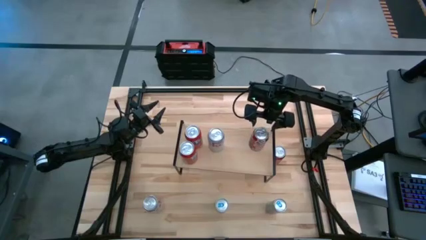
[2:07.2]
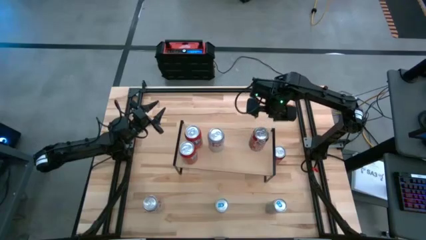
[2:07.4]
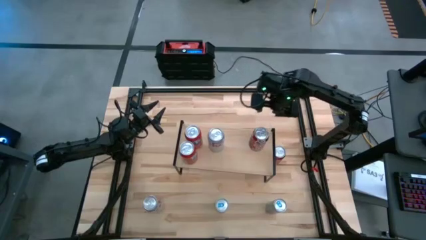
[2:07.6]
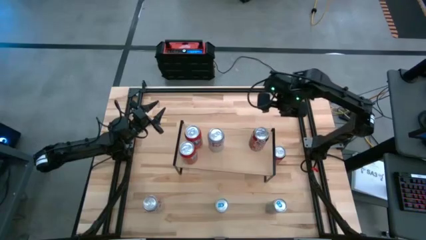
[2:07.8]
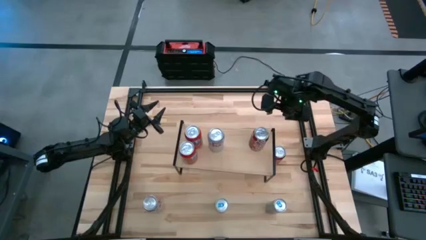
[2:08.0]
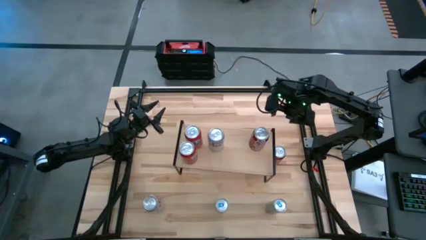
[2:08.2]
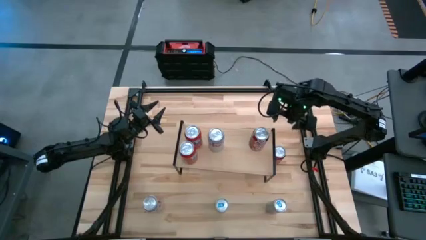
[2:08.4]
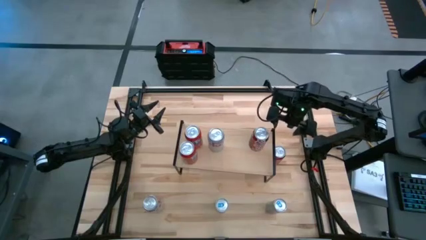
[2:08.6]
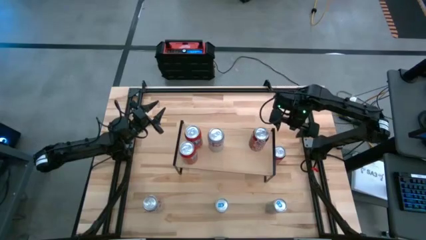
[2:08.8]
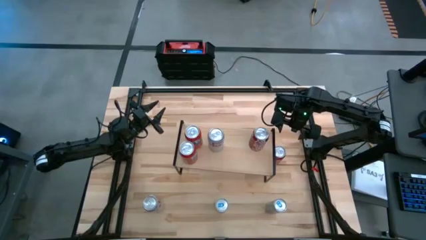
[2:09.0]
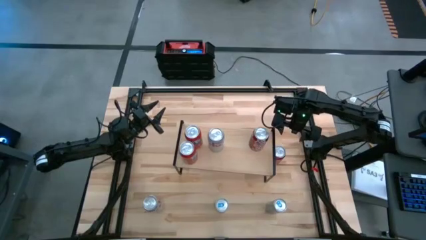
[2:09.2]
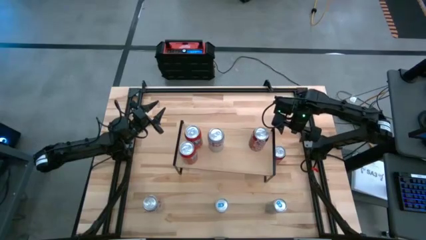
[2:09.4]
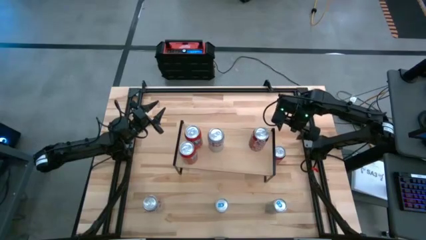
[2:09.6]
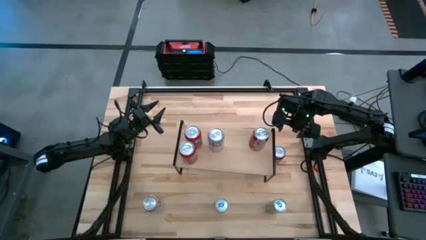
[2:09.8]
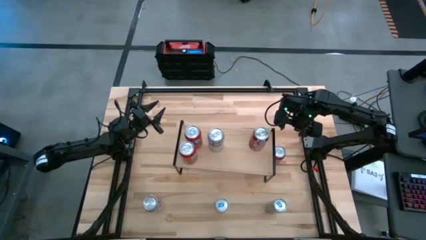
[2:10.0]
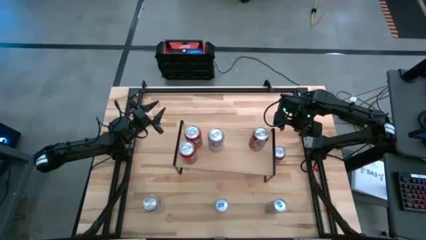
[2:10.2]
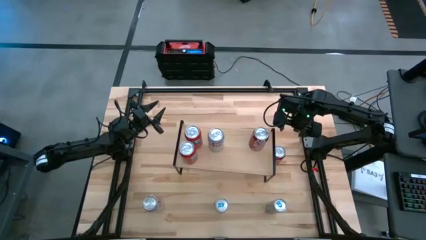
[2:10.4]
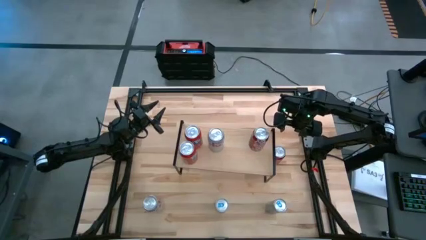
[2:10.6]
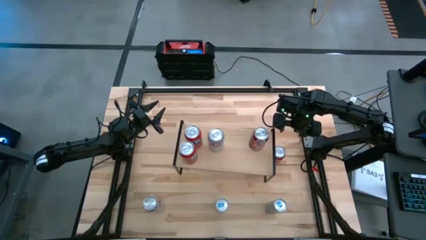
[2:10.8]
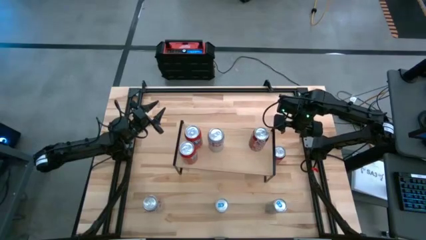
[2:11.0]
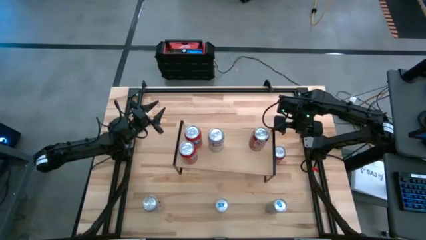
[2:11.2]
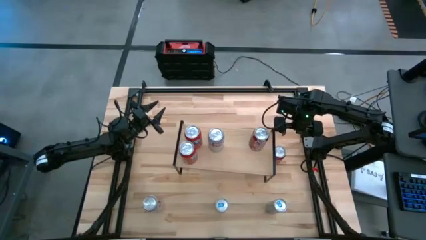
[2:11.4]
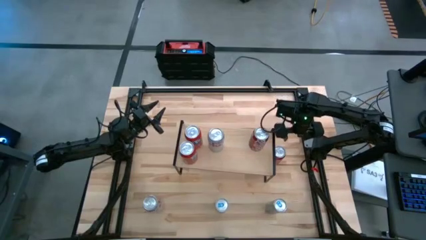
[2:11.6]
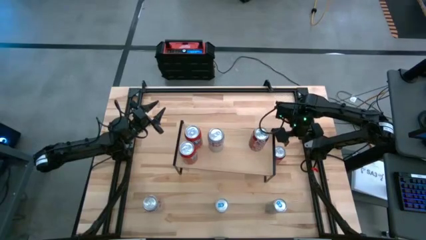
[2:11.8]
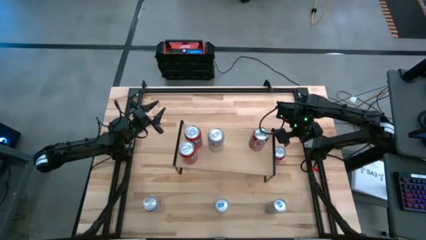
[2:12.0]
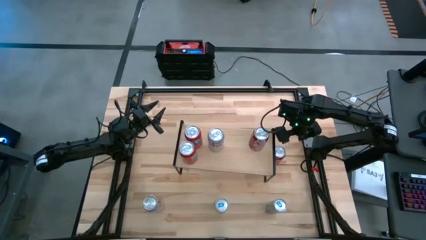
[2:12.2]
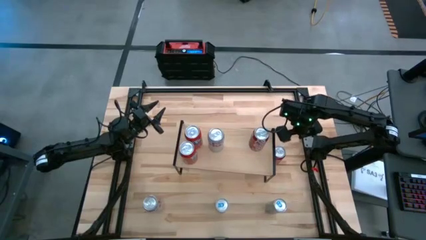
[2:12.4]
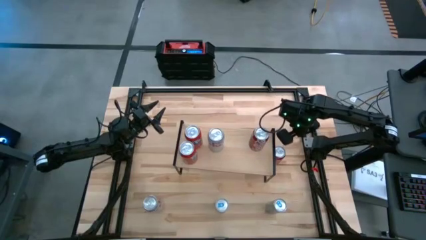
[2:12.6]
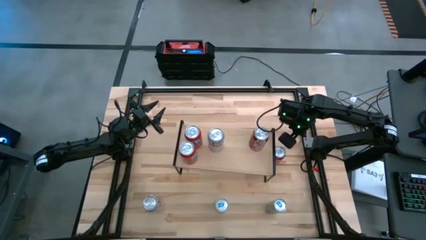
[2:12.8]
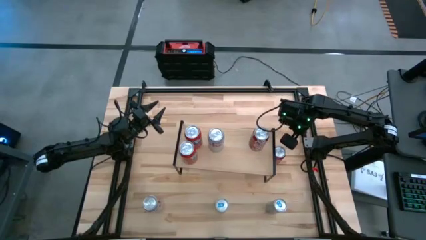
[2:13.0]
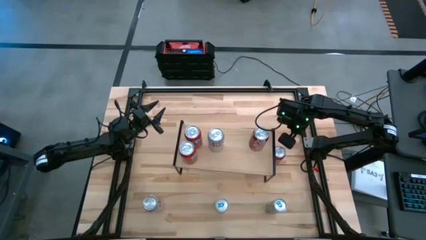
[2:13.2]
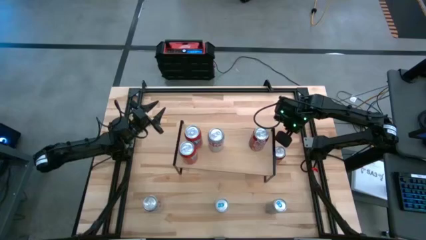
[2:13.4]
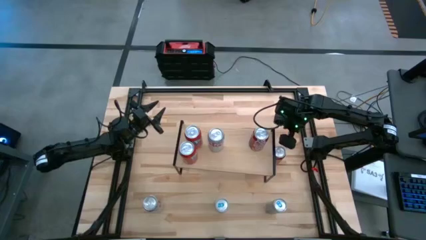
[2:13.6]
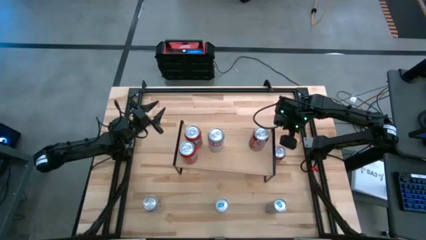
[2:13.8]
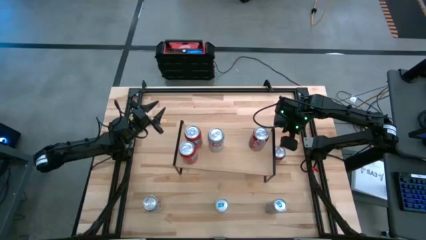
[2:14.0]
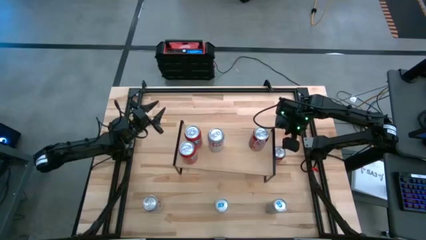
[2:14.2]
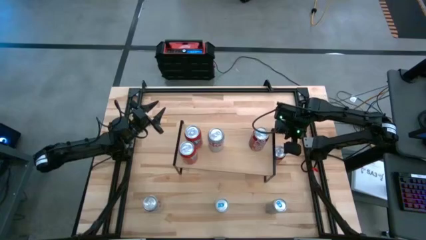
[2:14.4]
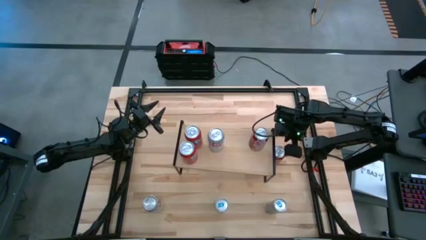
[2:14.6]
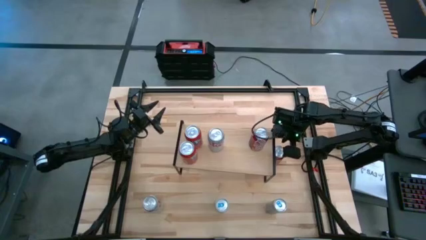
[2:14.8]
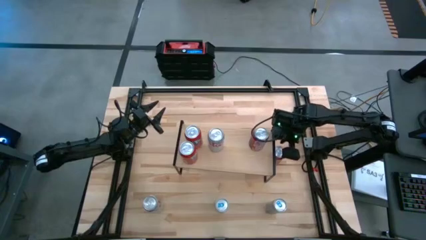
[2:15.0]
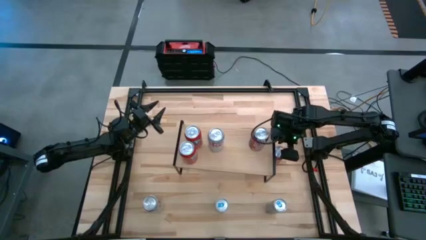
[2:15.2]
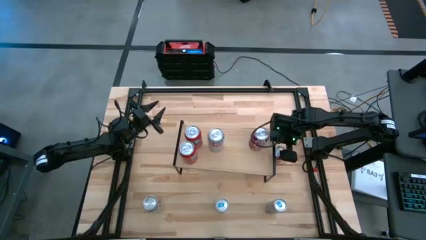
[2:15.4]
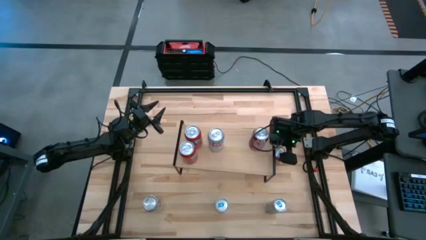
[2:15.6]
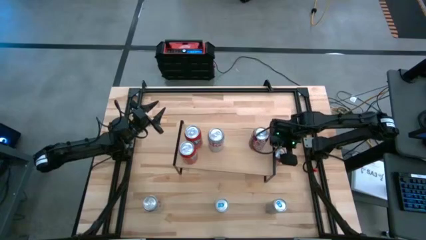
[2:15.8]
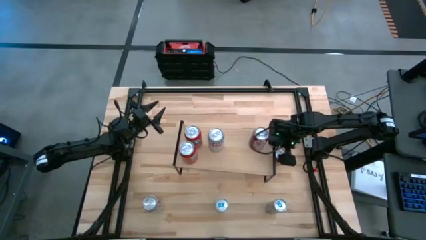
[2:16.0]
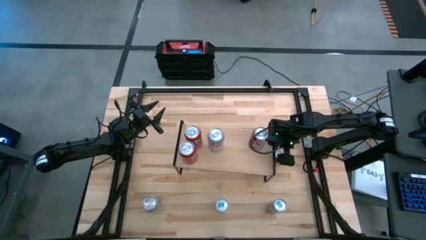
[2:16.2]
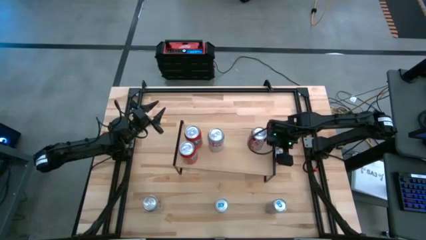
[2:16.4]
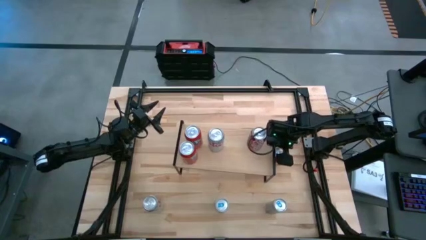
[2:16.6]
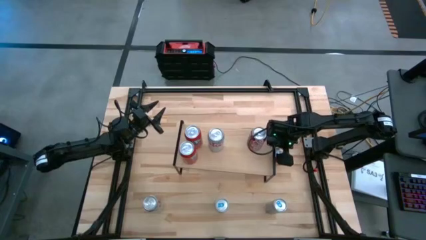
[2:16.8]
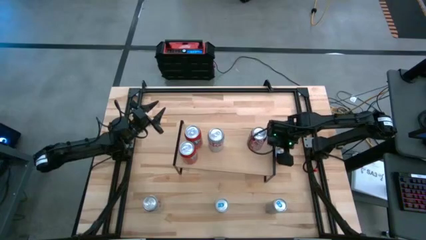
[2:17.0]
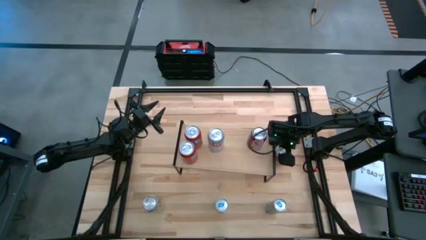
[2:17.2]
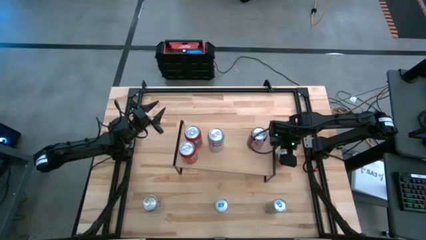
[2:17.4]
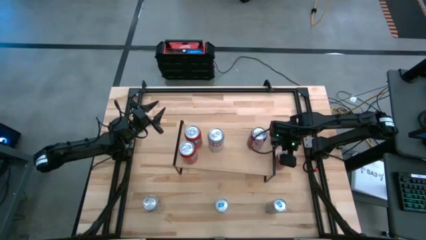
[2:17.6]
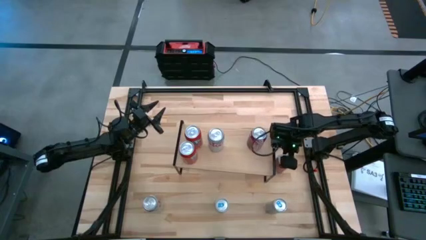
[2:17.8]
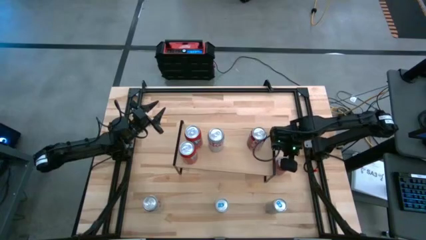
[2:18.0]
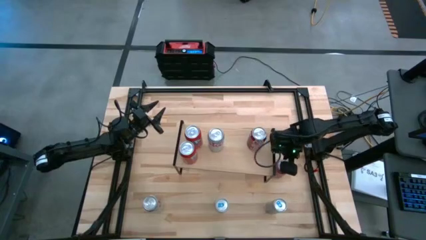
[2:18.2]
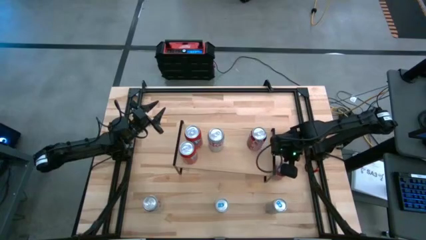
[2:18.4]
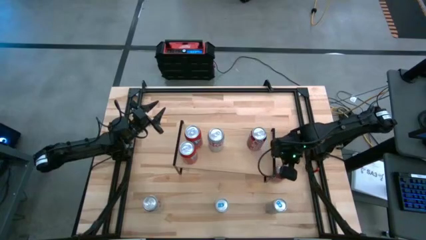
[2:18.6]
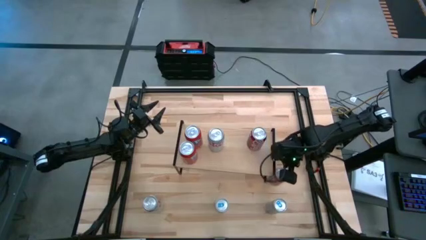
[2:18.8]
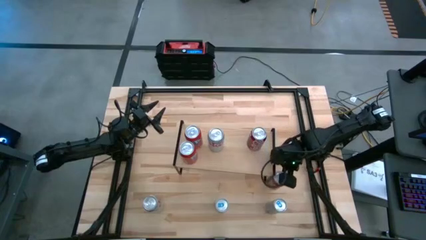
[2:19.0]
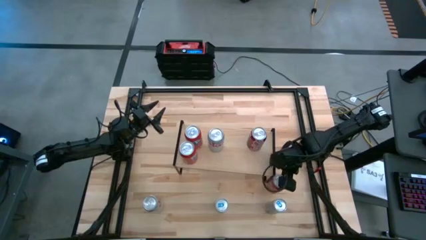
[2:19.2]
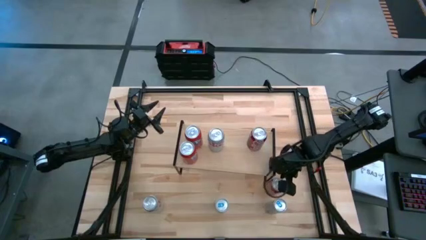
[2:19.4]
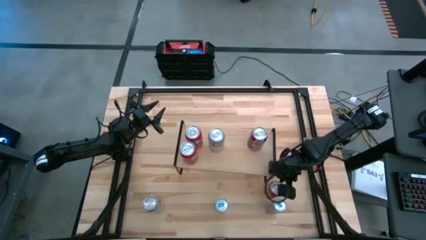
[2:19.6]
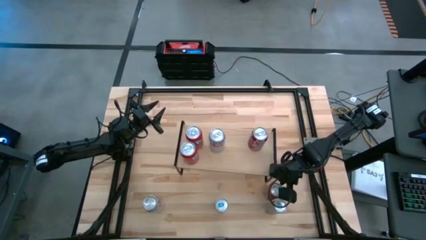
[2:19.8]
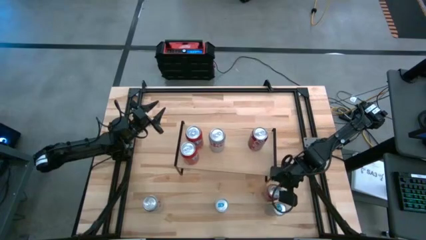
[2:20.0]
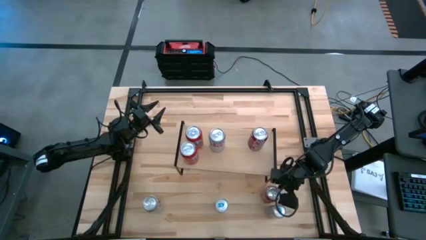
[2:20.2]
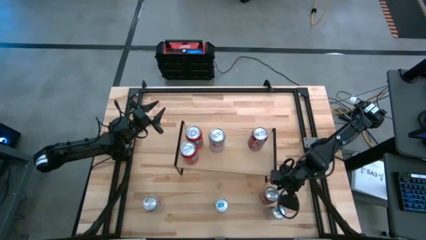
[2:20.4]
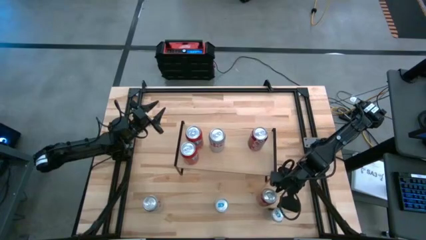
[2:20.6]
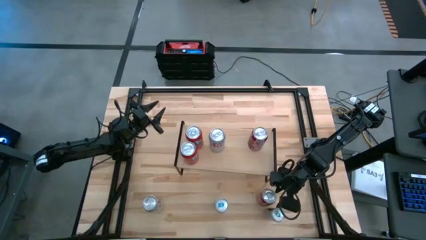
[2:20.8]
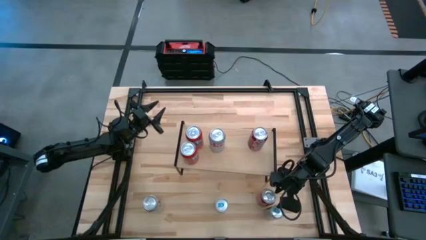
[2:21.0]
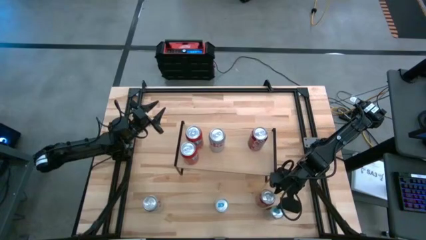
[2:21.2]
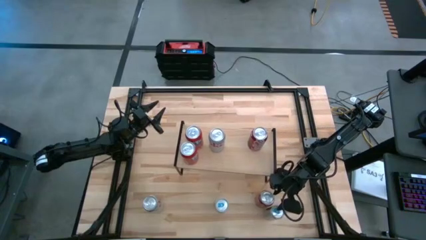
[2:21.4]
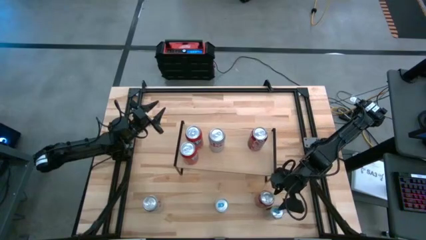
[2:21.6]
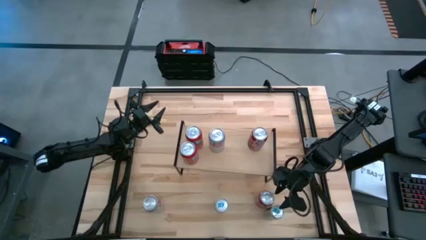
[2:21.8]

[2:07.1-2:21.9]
Task: Place canned beverage on shelf
Move the red soda can to the bottom right of the table

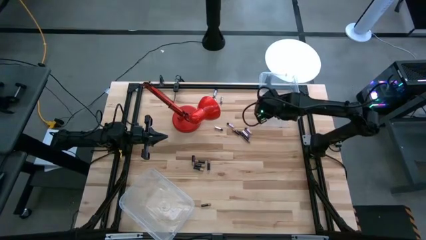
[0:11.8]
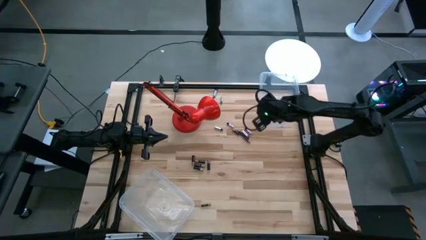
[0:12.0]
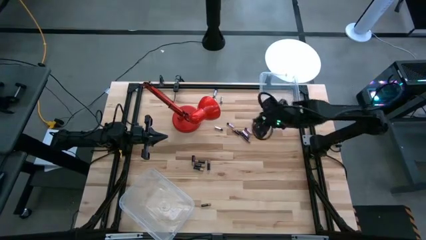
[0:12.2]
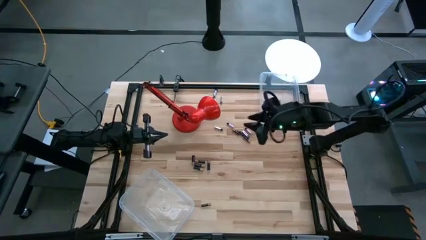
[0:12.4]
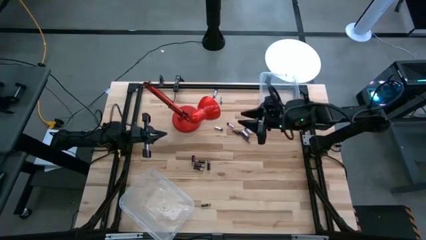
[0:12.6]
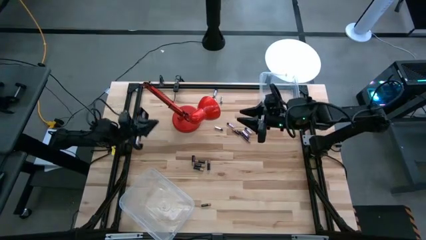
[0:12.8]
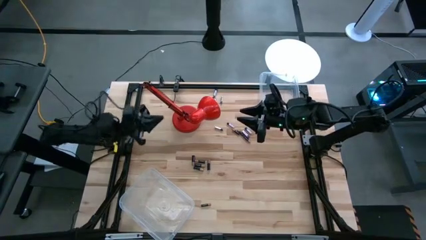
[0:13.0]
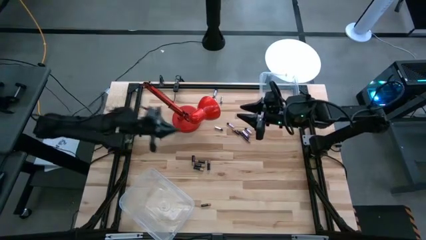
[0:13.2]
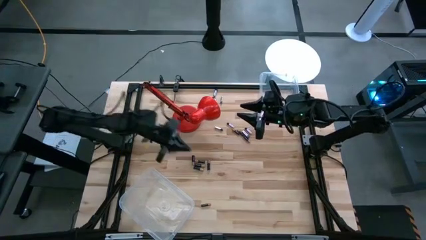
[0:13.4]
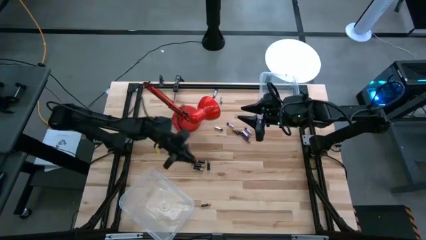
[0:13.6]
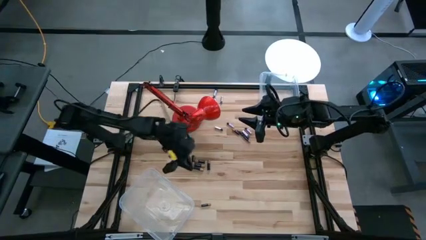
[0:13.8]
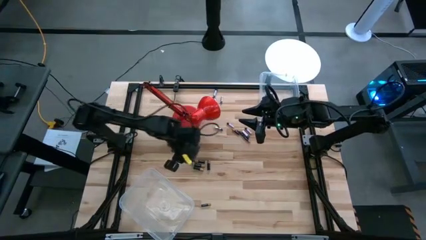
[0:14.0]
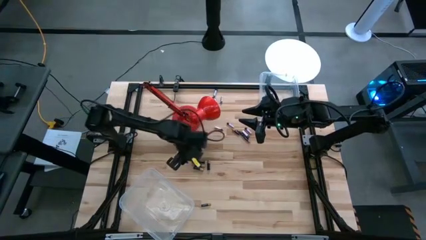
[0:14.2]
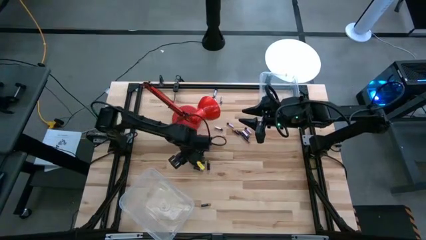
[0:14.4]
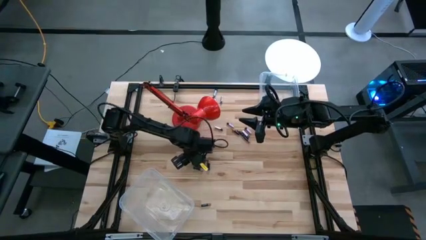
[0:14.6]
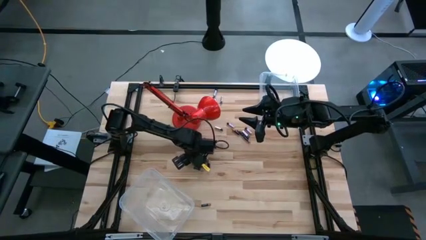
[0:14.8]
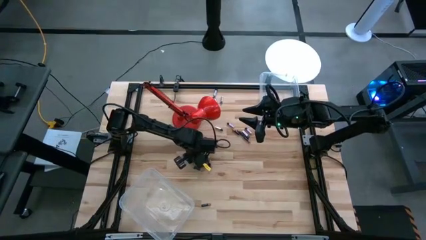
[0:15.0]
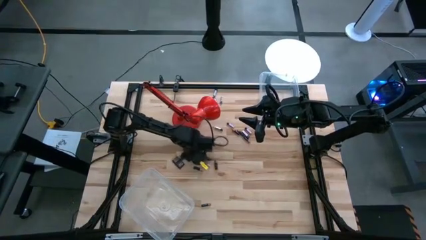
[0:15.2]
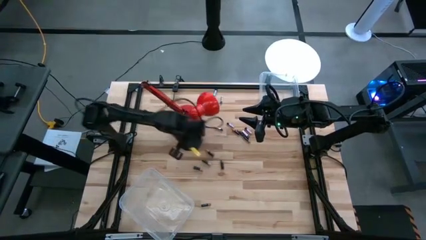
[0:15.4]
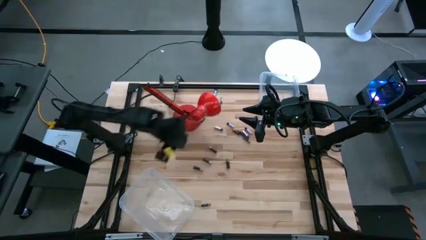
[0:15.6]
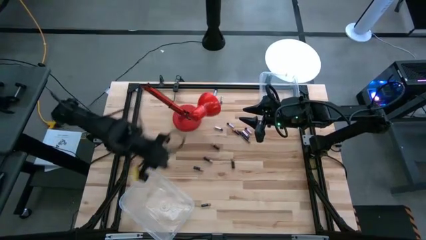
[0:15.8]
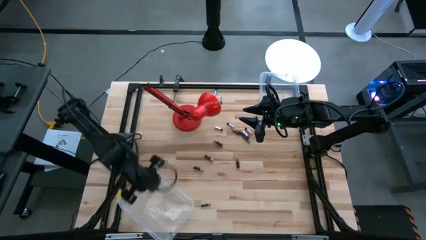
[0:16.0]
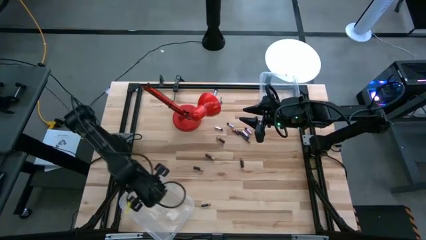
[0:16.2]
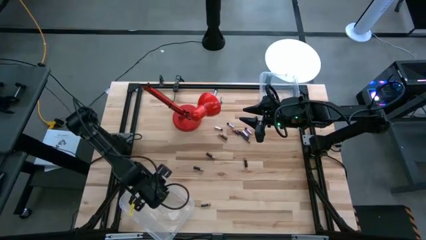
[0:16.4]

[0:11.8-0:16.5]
Task: Sort batteries
Put the black battery into the bottom transparent bin
